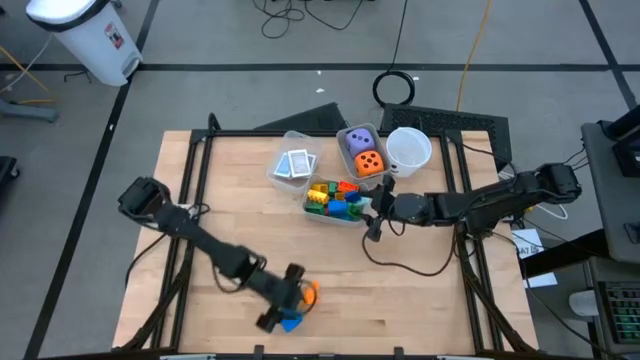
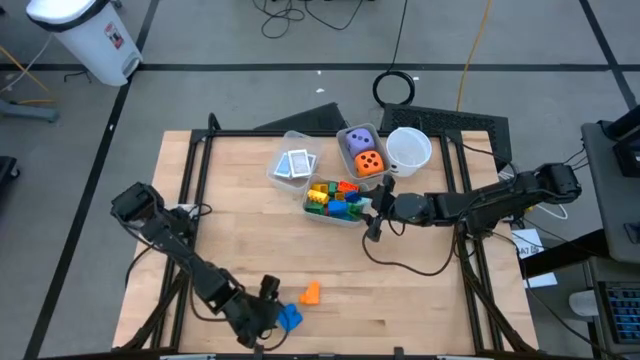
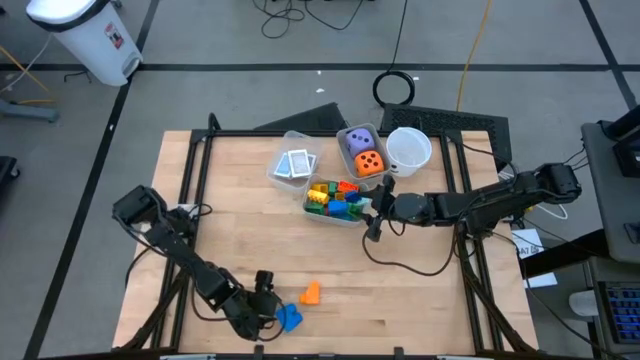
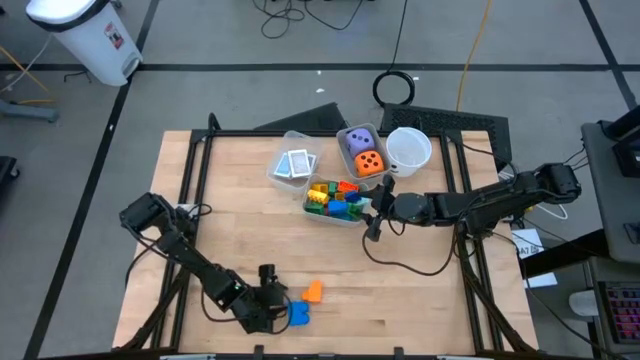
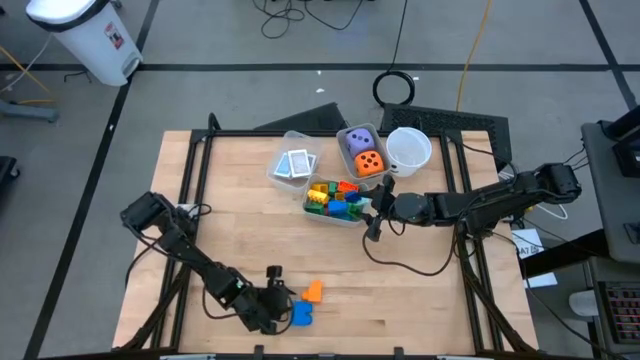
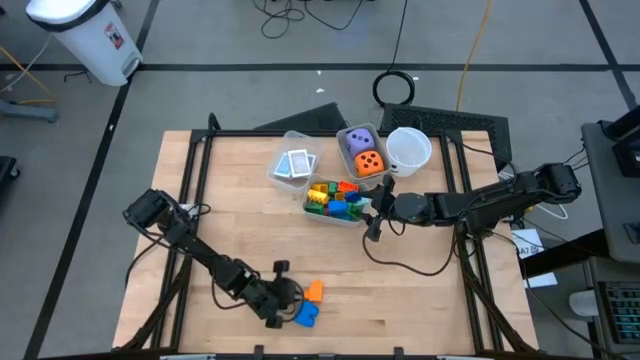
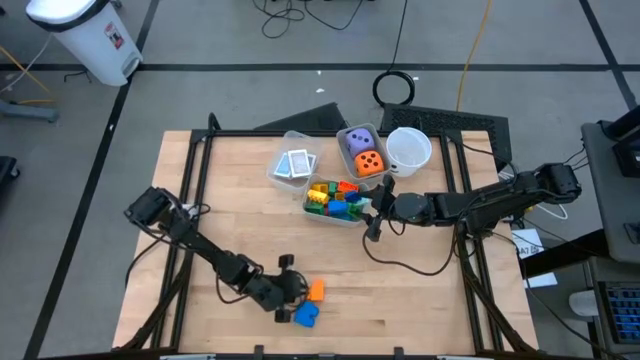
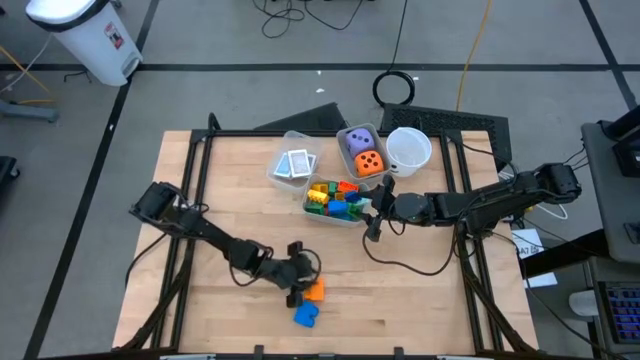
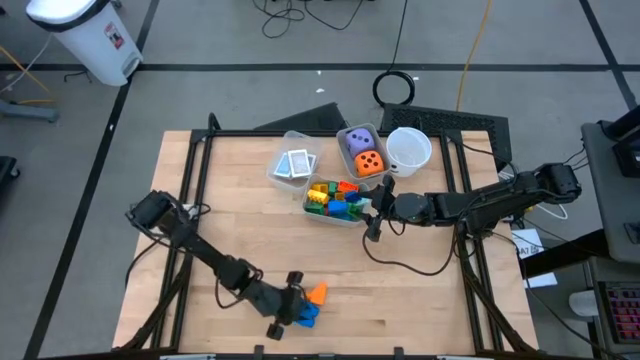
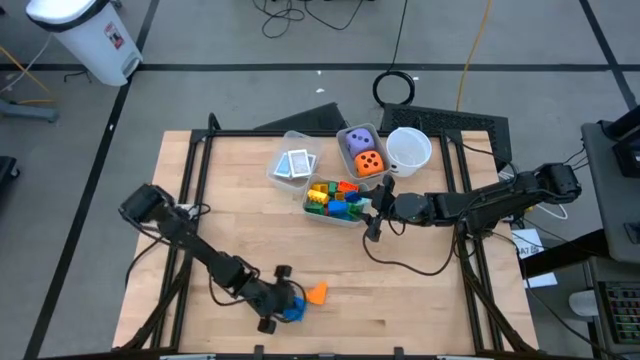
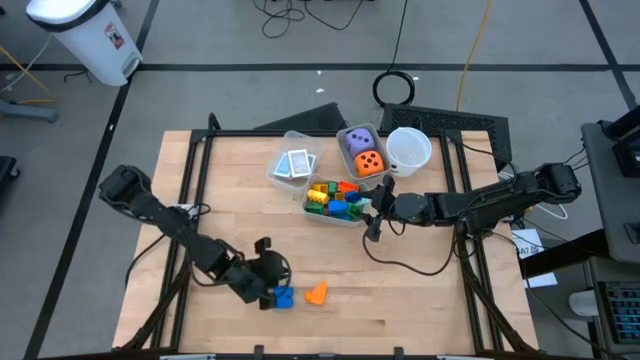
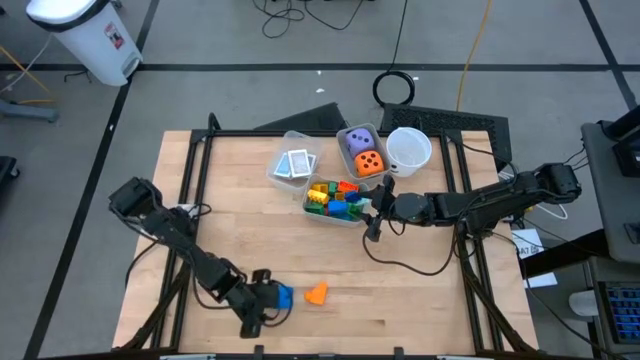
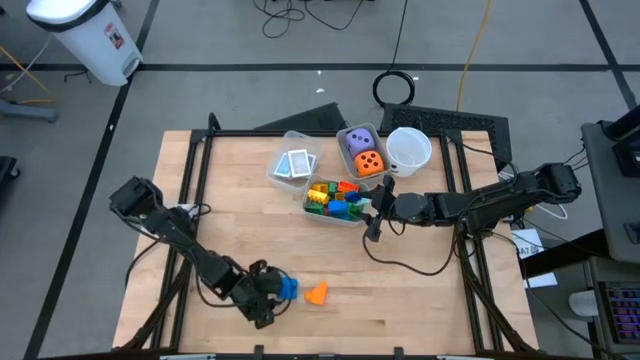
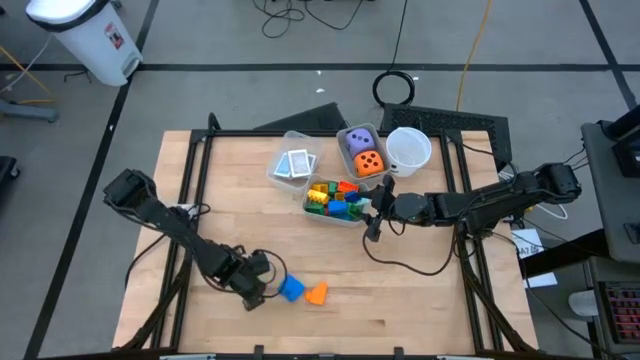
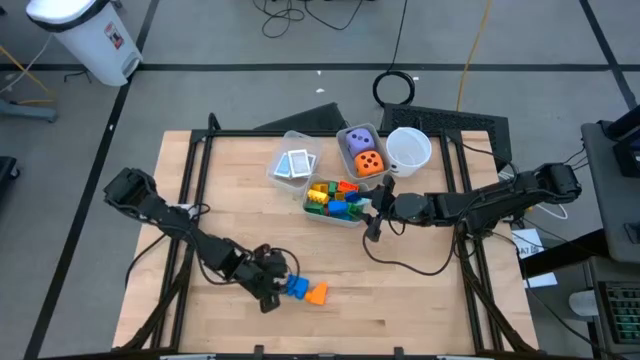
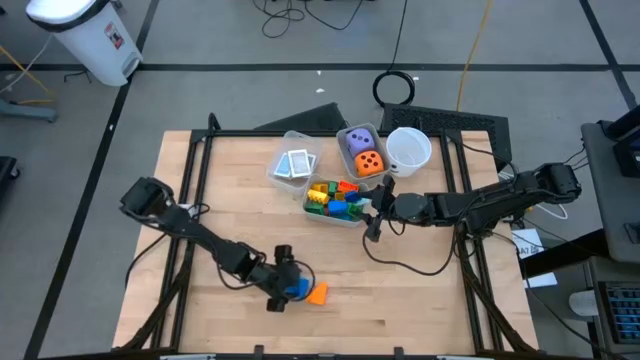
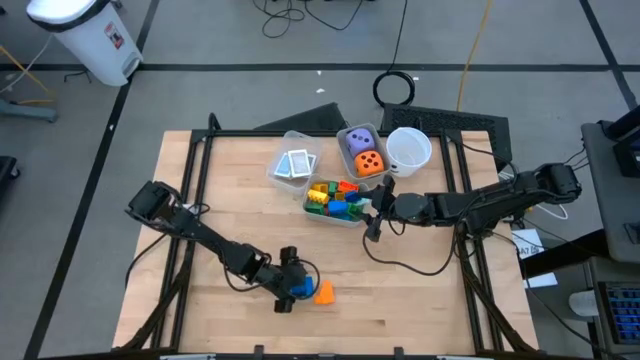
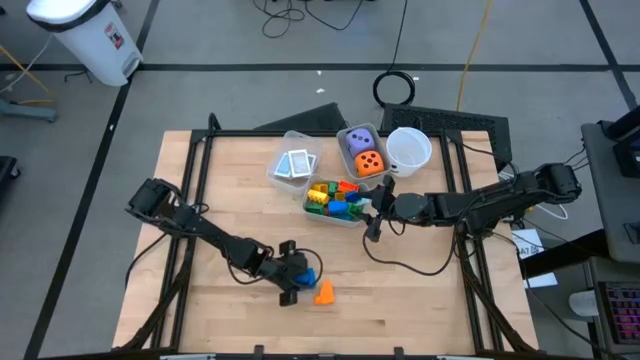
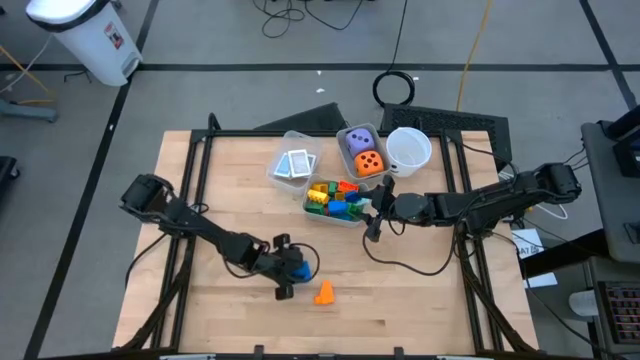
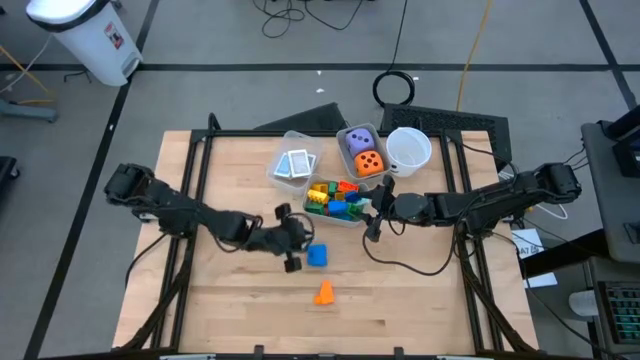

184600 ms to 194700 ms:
Task: Pick & Place Toys
Put the blue game piece into the bottom gray bin

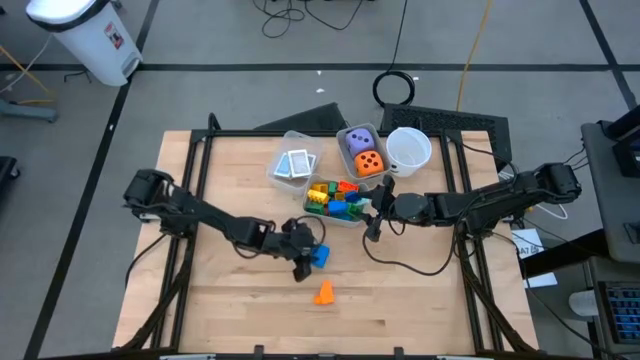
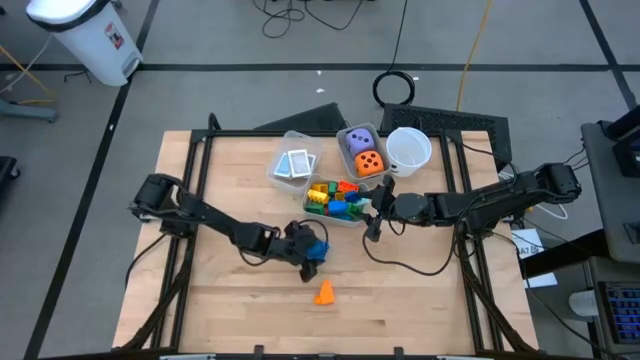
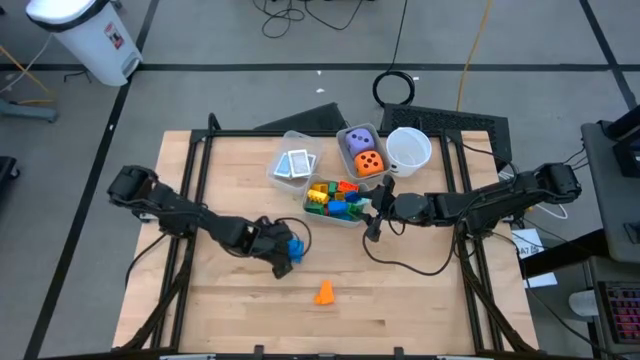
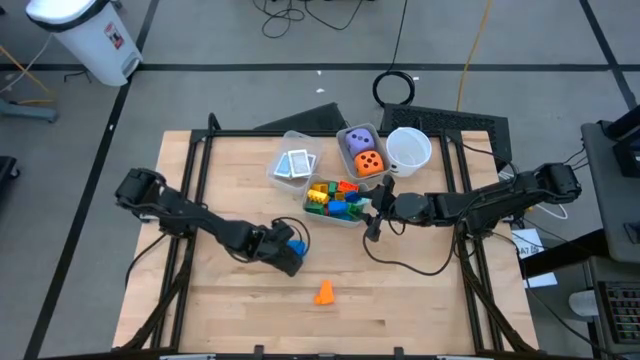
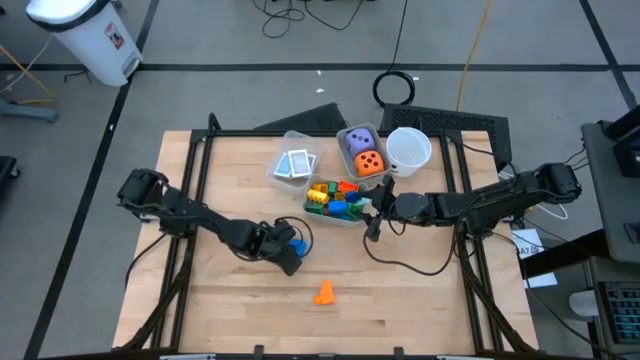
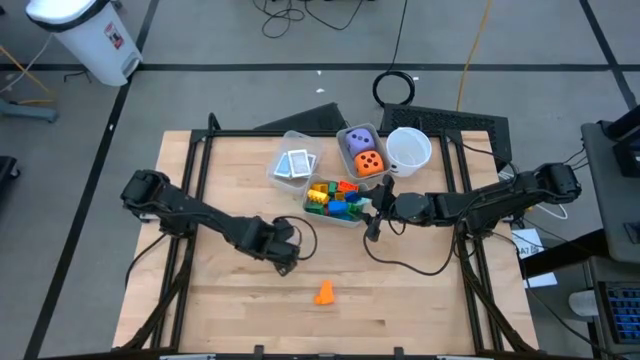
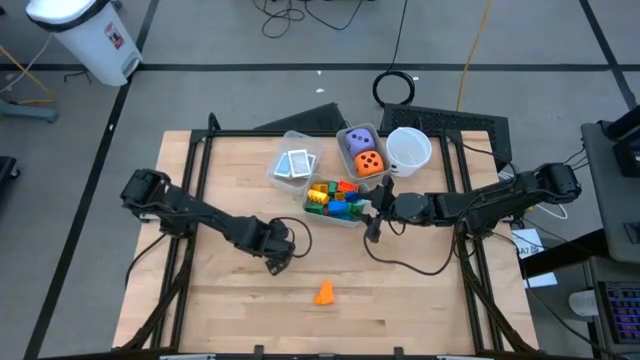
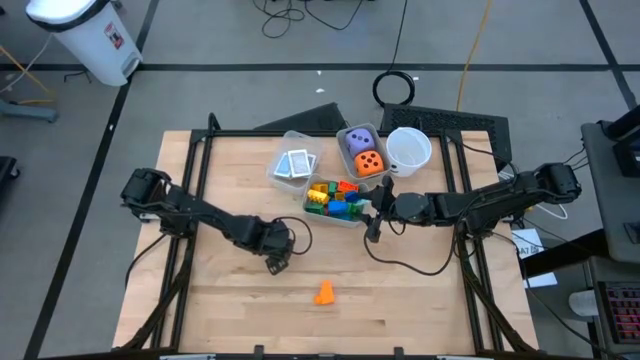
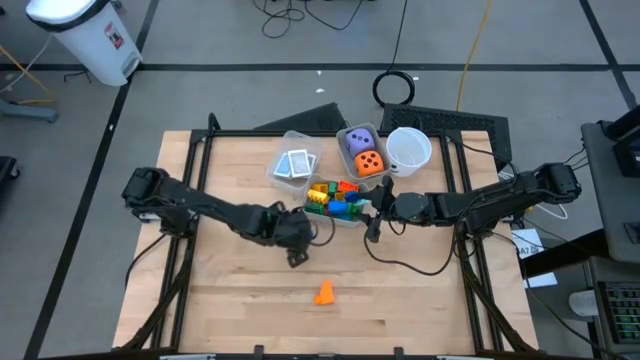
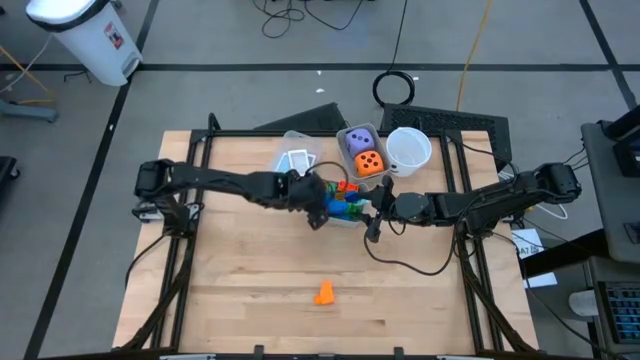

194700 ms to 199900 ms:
Put the blue game piece into the bottom gray bin

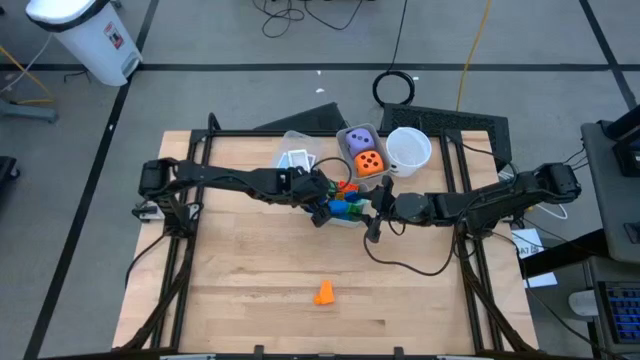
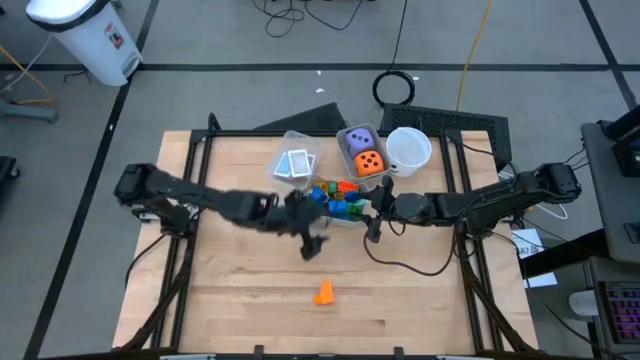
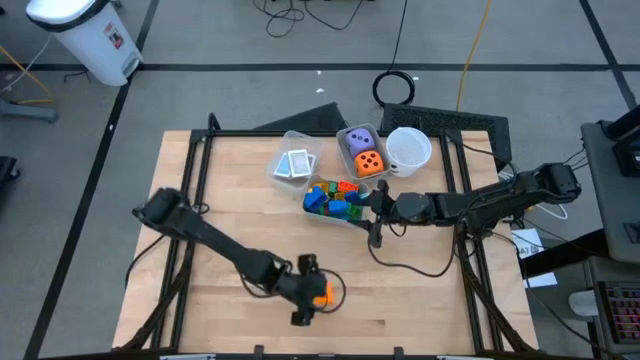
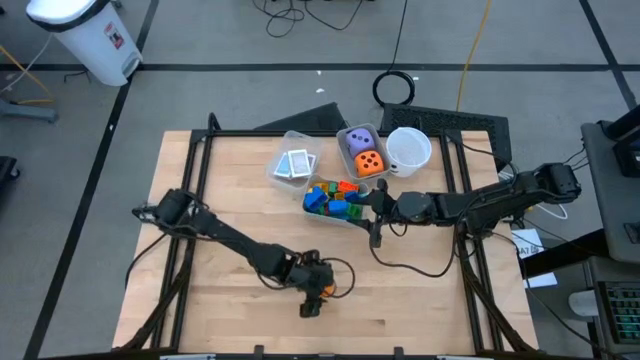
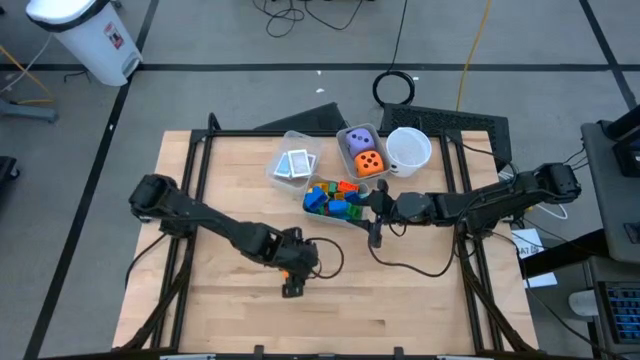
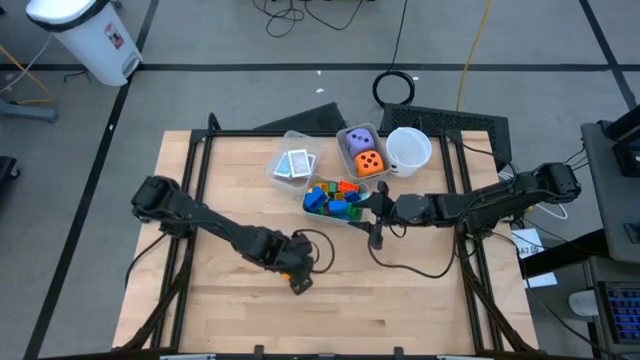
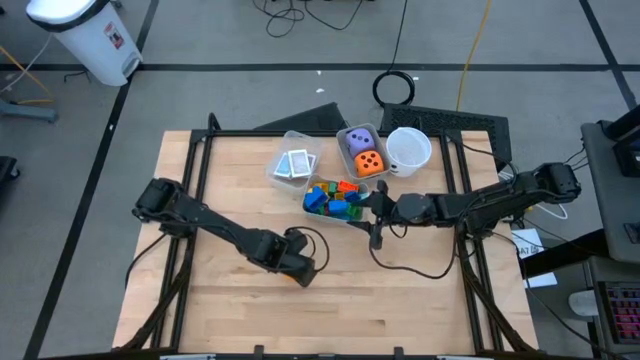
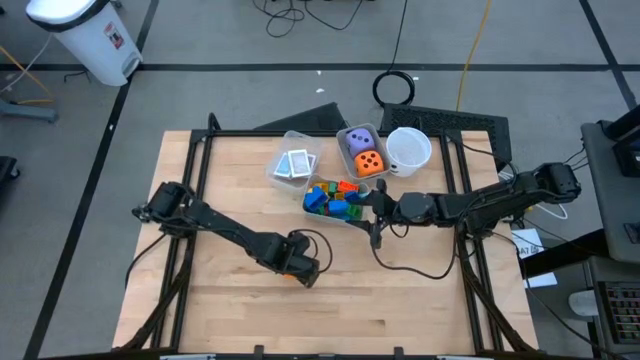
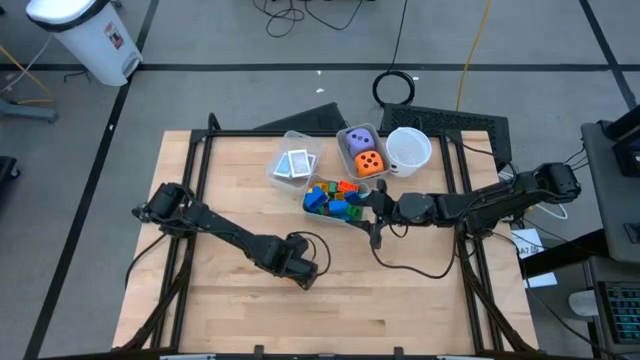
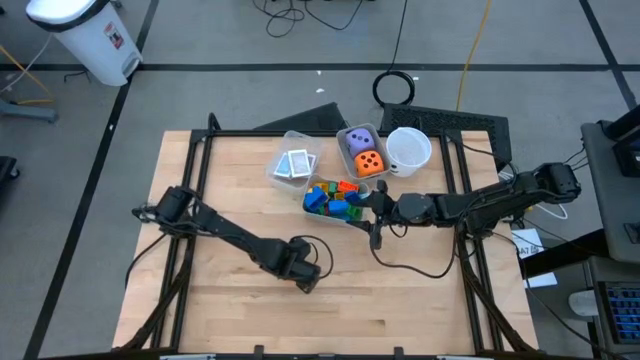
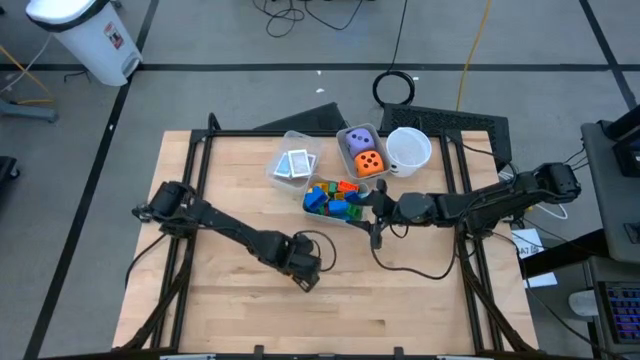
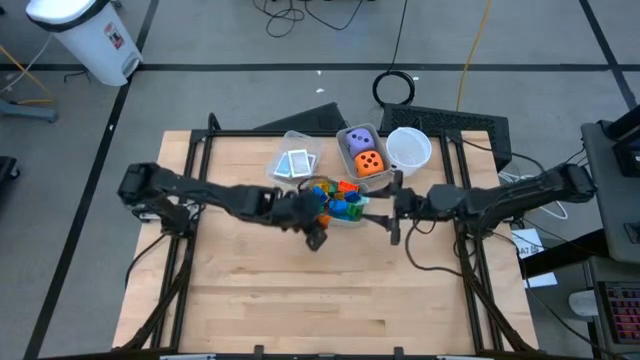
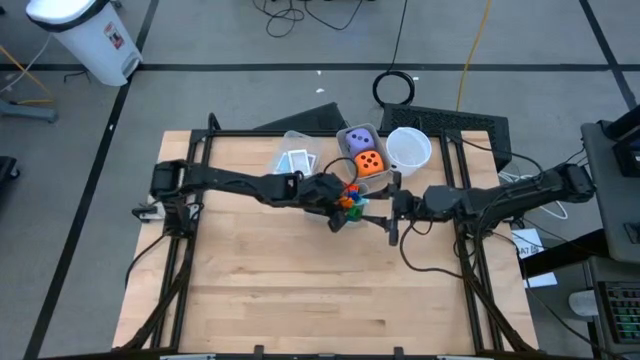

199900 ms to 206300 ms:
Put the yellow game piece into the bottom gray bin
